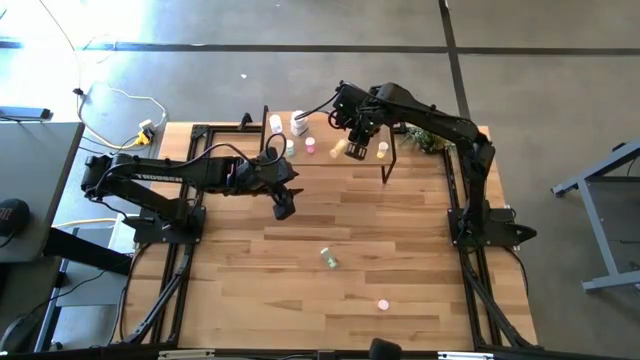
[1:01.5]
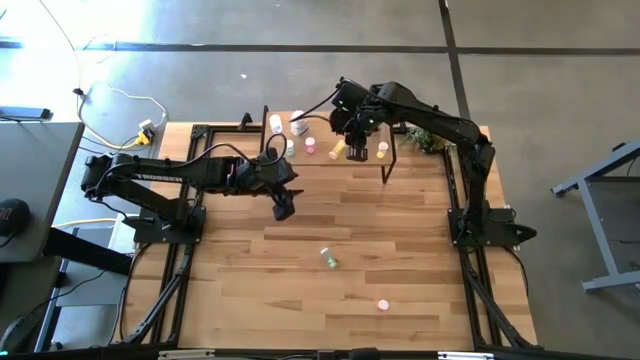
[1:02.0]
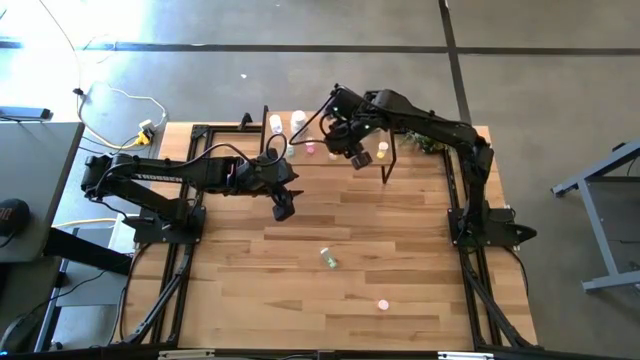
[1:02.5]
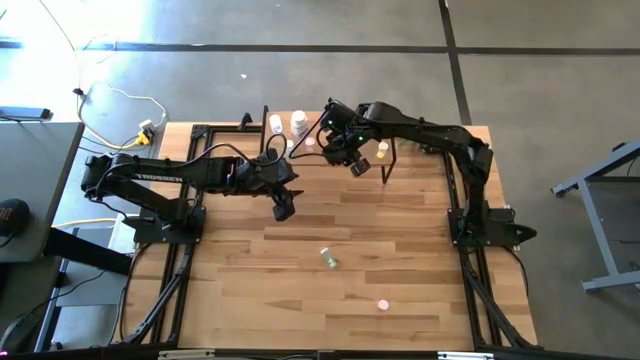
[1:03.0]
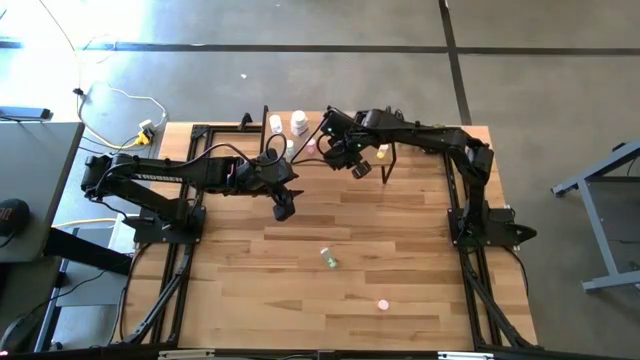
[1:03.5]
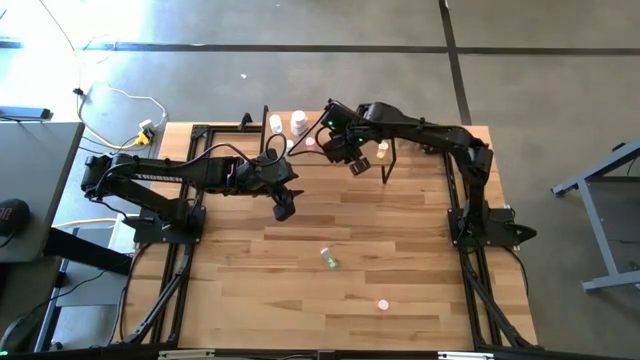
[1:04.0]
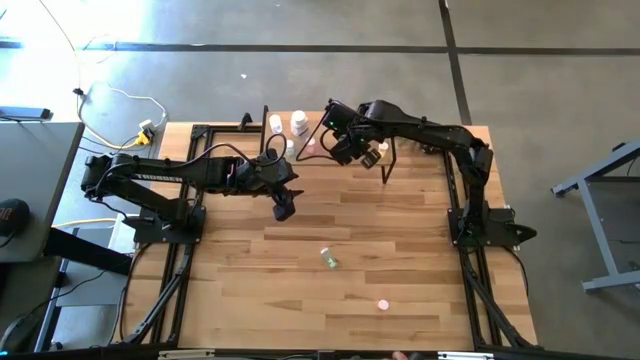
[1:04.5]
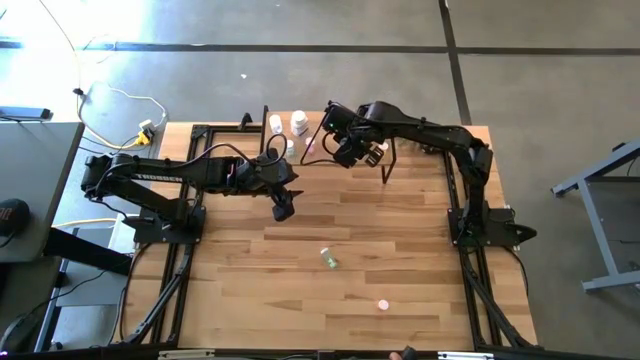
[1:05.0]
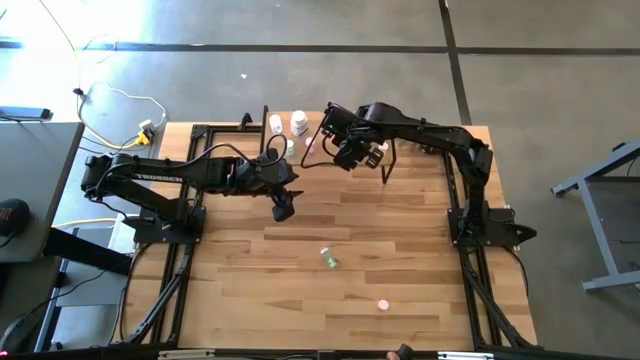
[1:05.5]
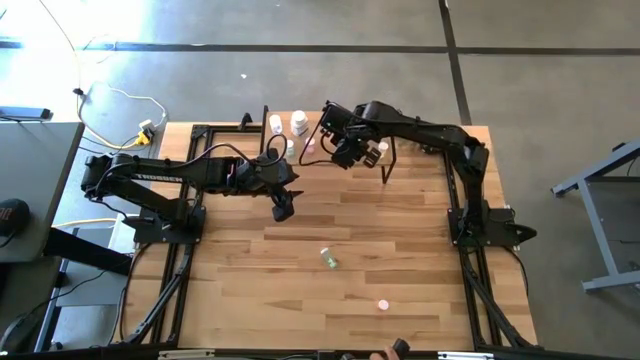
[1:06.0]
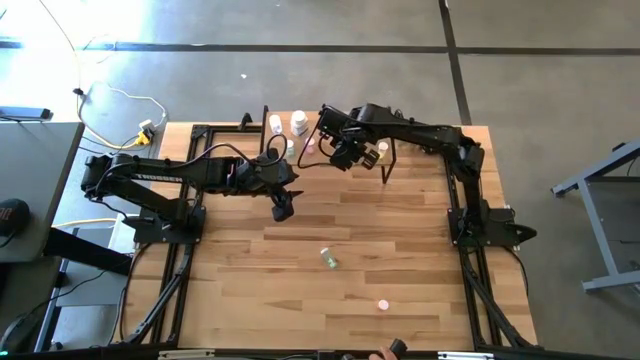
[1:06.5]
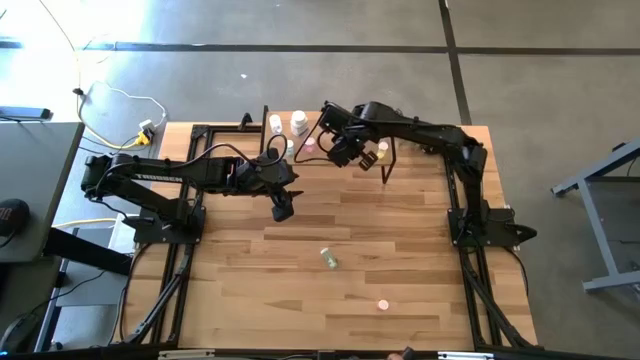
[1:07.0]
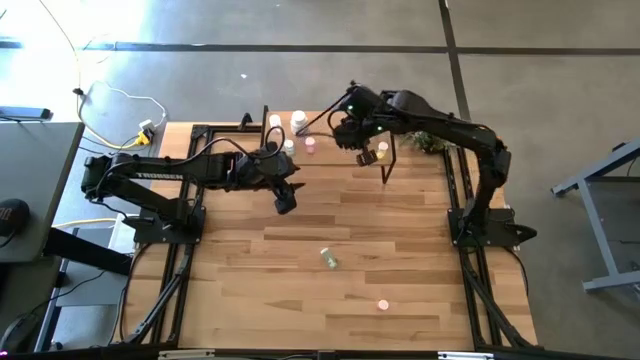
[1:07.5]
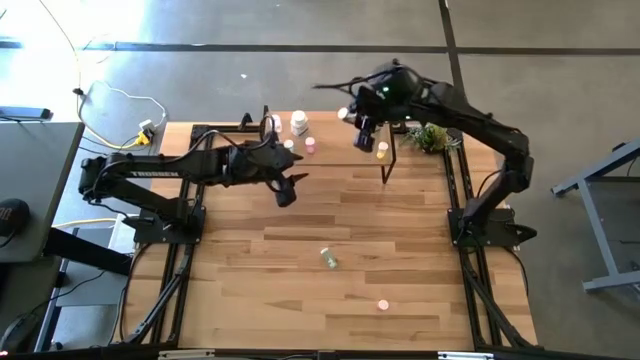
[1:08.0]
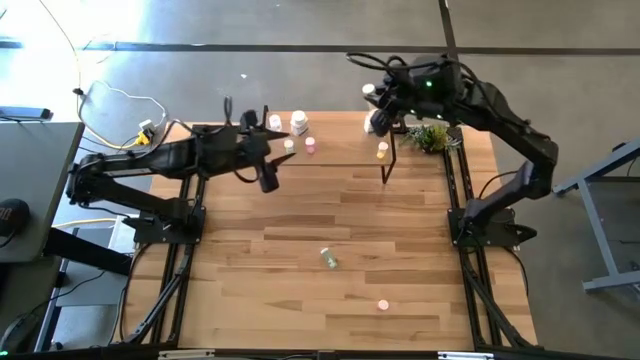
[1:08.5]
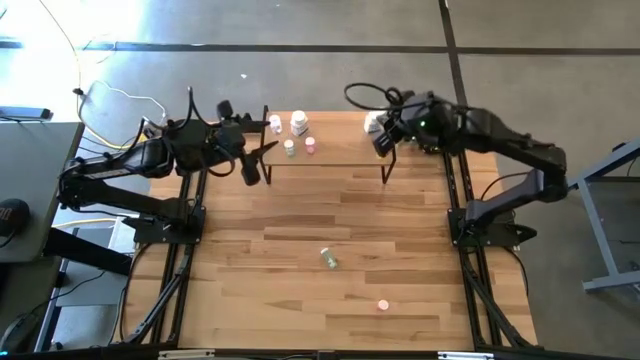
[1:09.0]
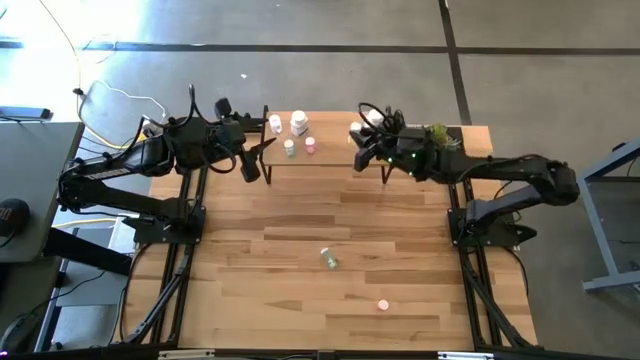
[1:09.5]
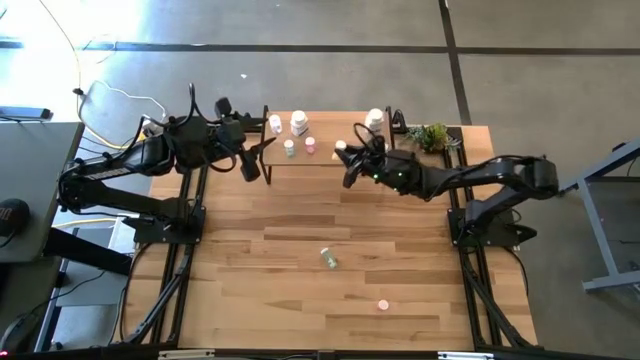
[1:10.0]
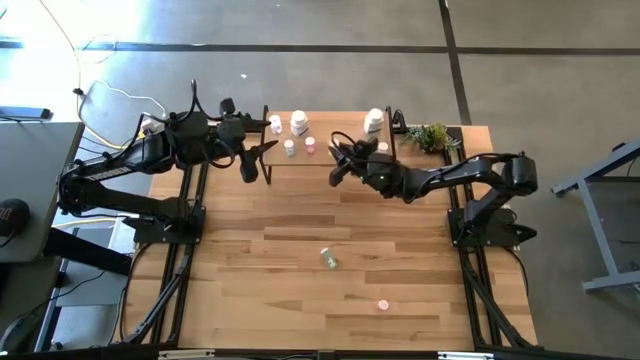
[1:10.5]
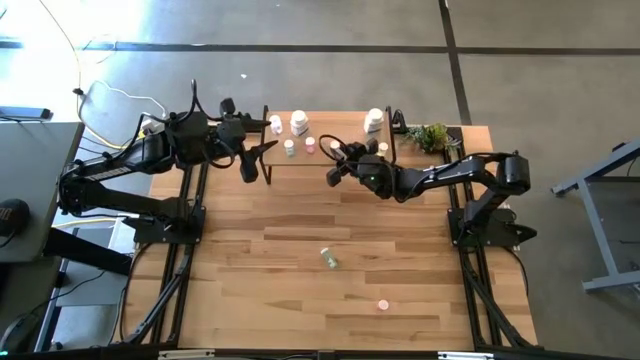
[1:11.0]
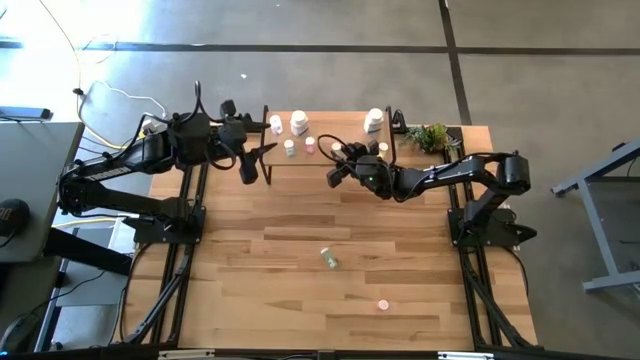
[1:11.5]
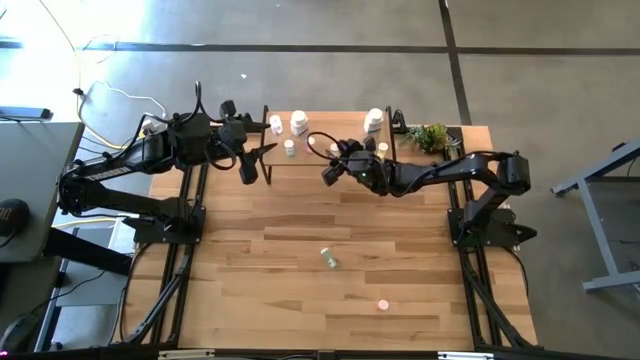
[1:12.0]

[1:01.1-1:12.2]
Task: Pick and place medicine bottles onto shelf by color
Put the yellow medicine bottle on the shelf

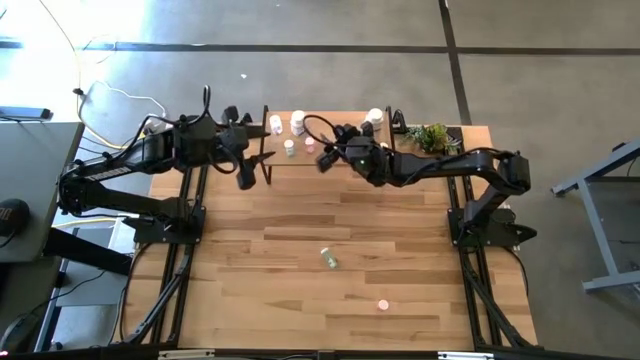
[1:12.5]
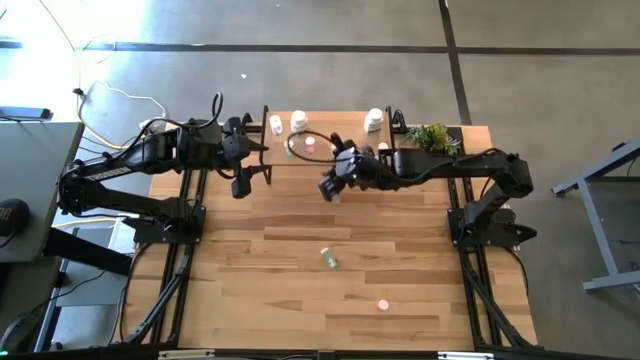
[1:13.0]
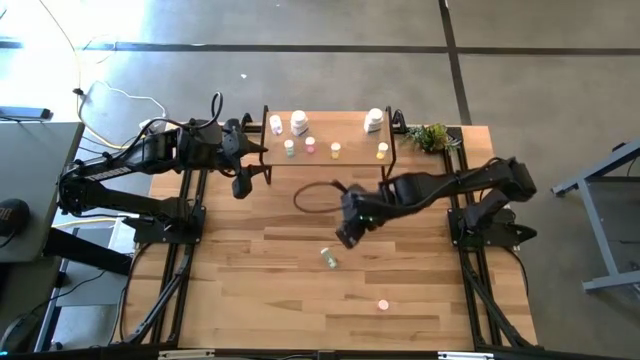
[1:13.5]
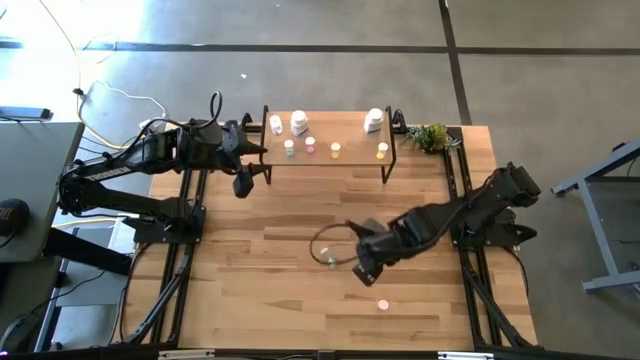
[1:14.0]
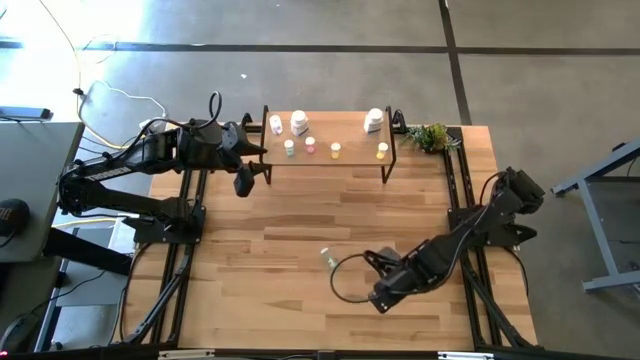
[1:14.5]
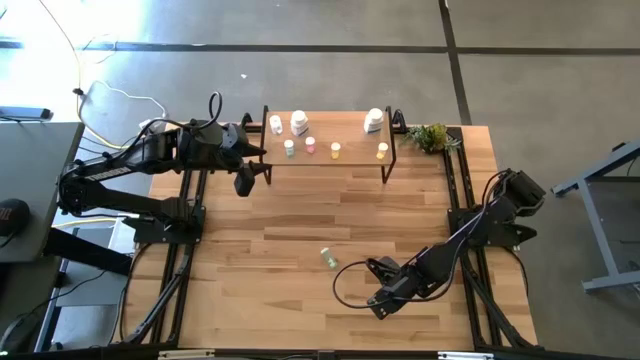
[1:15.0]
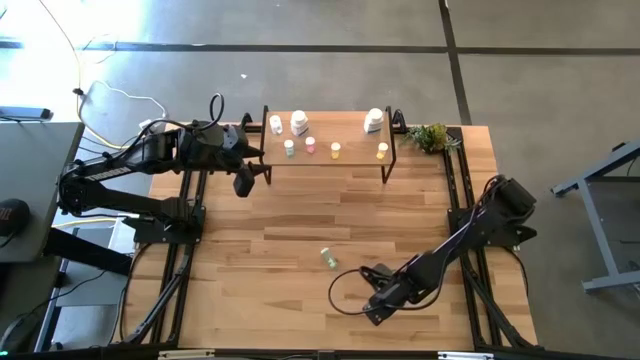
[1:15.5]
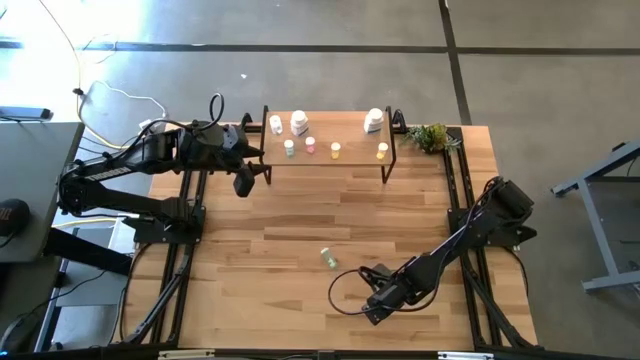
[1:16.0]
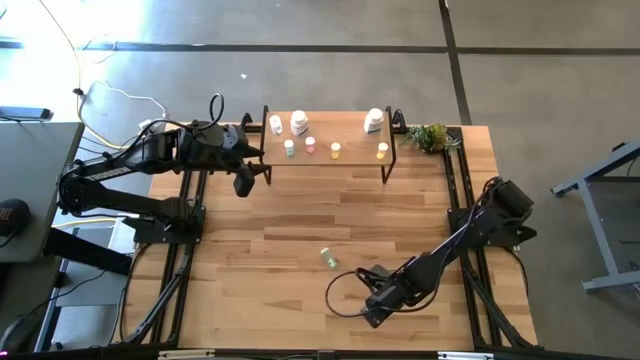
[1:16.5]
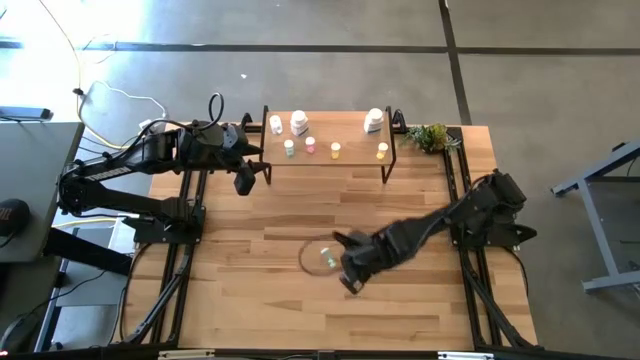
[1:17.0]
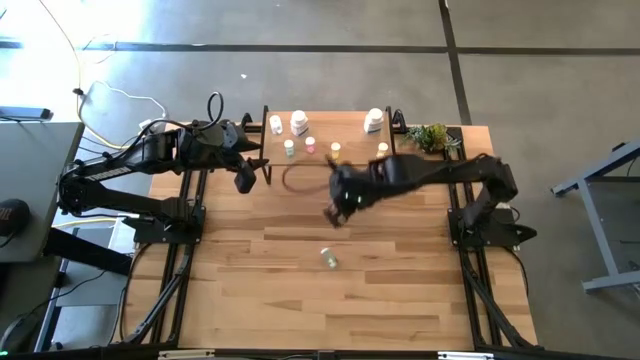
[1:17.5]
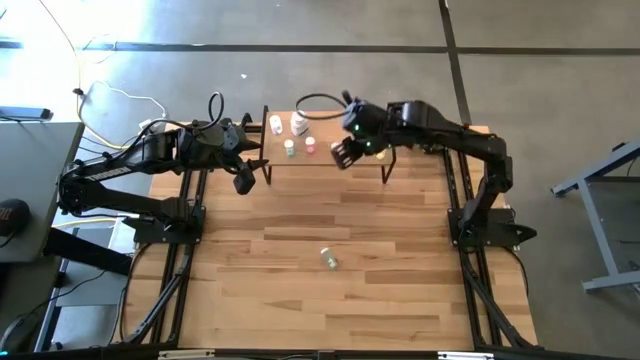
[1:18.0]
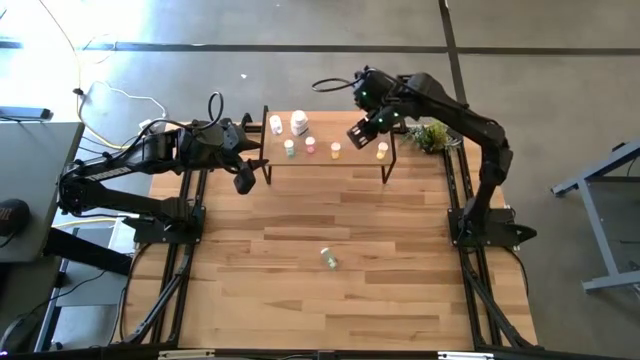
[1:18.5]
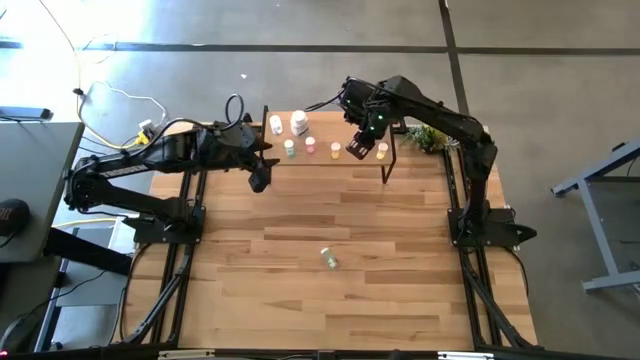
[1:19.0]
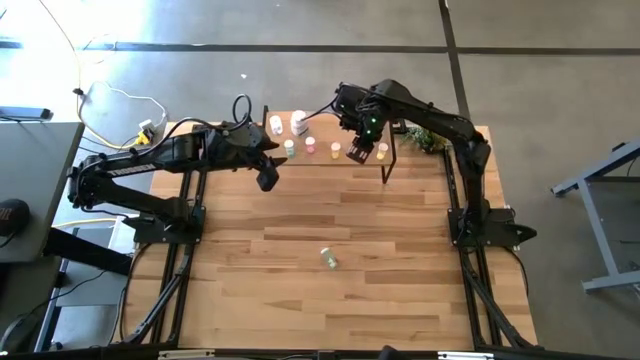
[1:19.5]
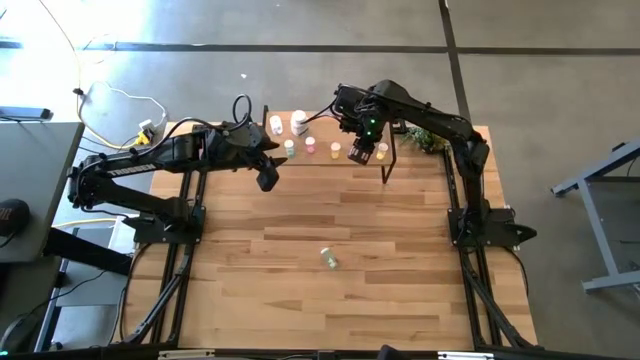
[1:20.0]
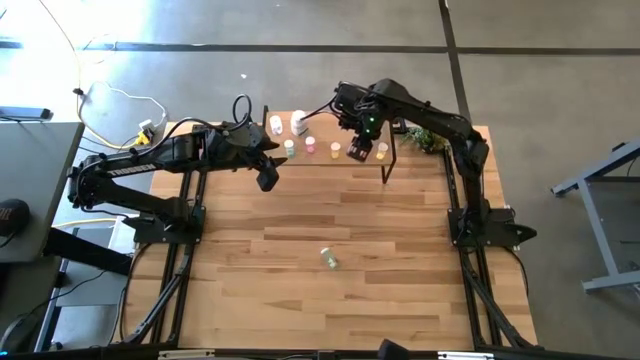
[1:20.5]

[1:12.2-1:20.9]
Put the pink medicine bottle on the shelf

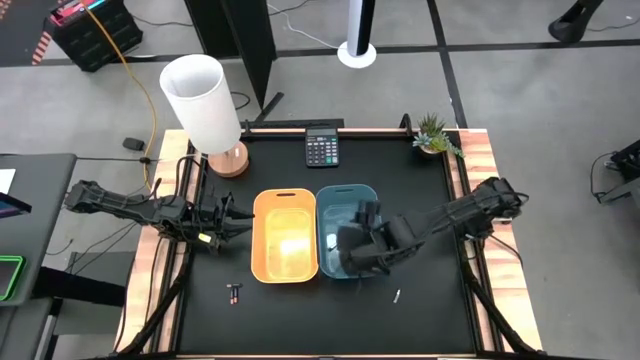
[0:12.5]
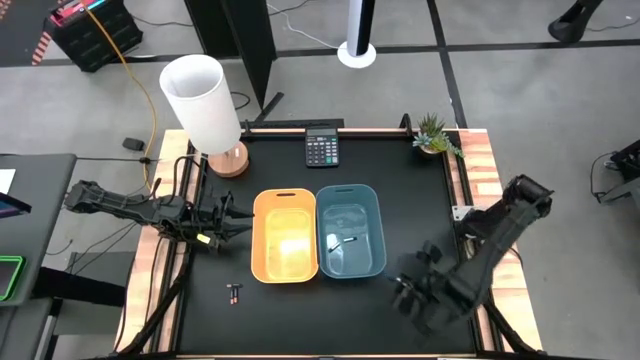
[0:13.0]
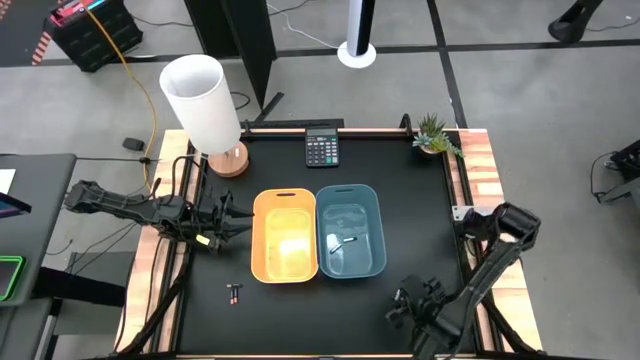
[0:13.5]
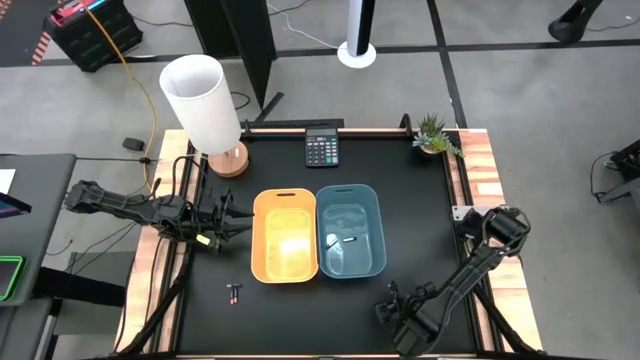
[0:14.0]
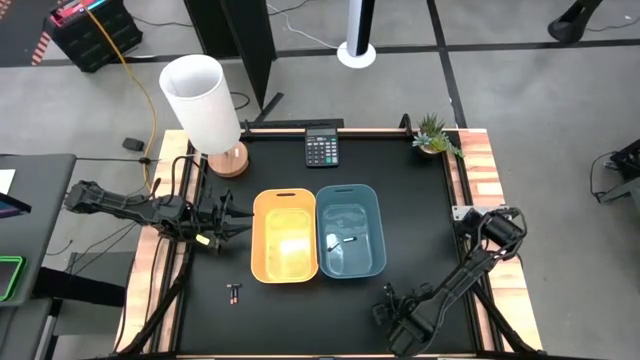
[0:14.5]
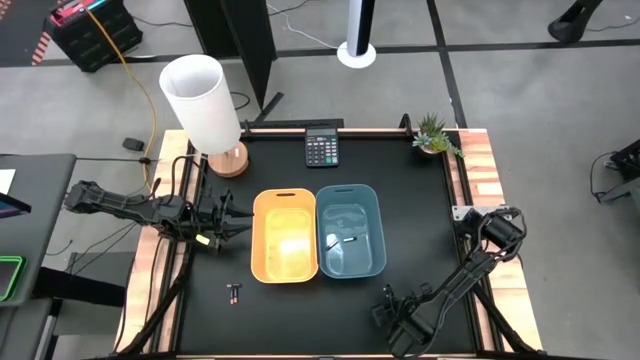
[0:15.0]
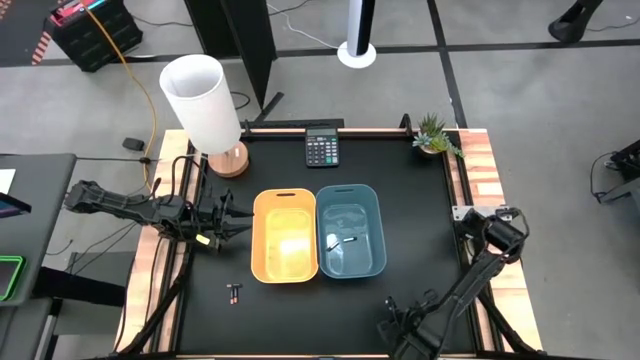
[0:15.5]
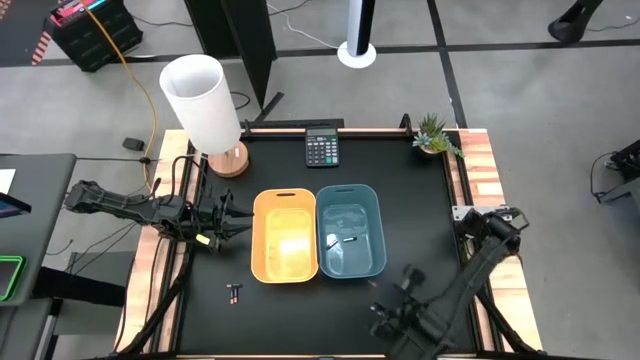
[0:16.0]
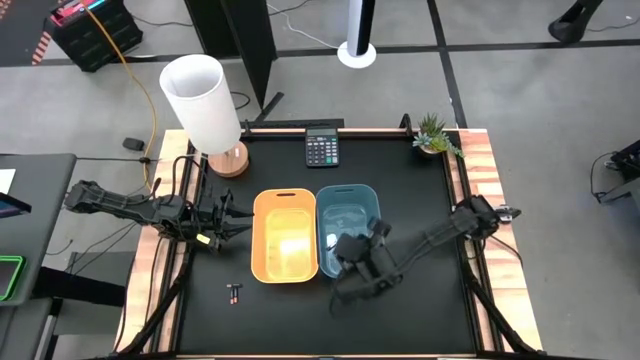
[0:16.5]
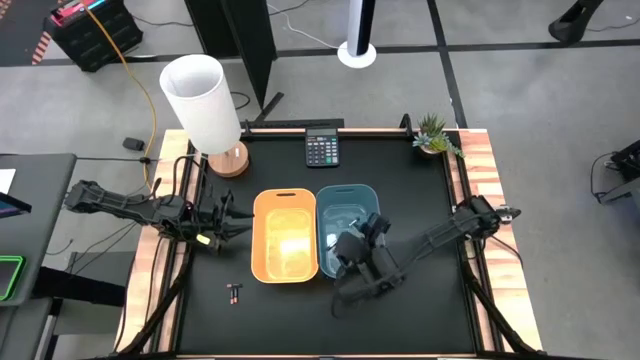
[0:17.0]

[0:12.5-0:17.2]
Task: Sort batteries
Put the silver battery into the blue bin
